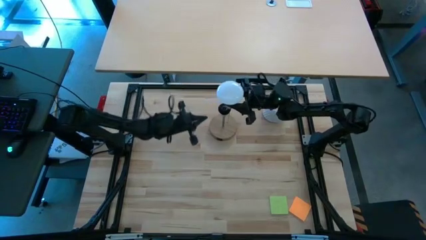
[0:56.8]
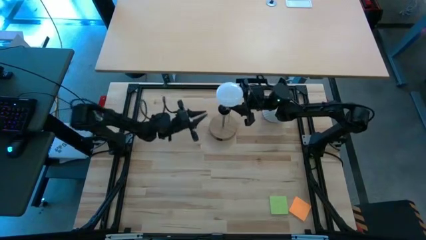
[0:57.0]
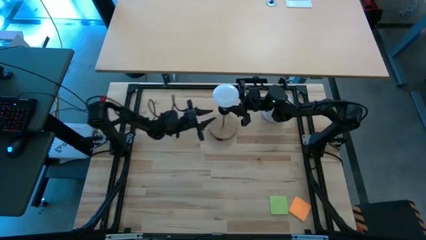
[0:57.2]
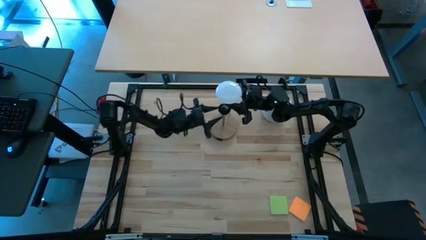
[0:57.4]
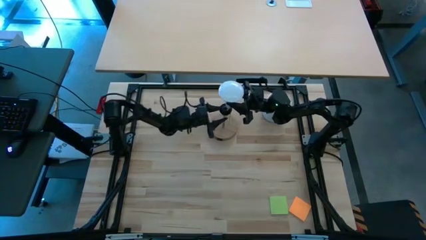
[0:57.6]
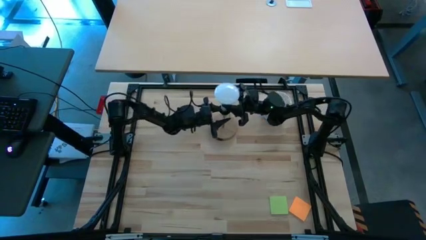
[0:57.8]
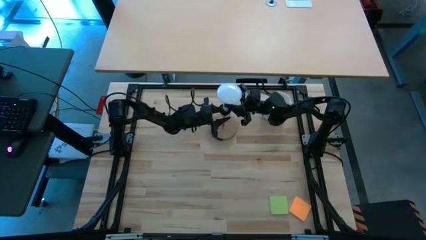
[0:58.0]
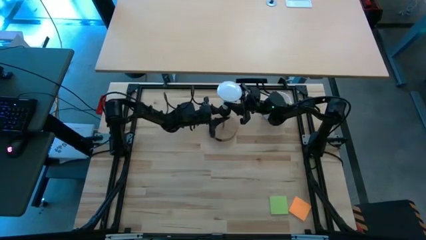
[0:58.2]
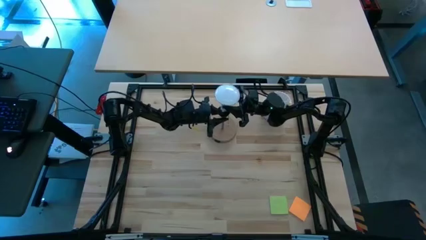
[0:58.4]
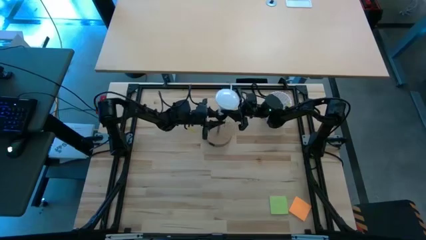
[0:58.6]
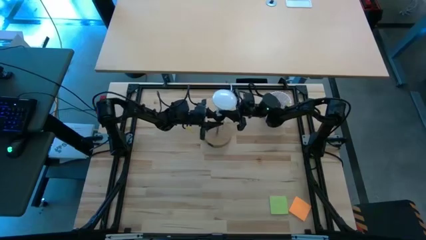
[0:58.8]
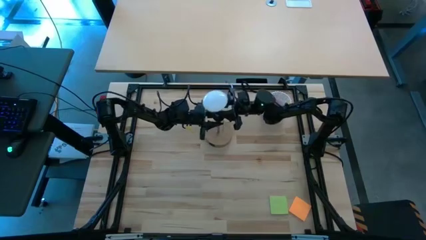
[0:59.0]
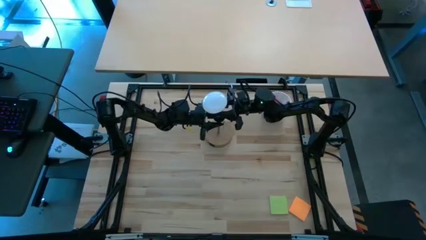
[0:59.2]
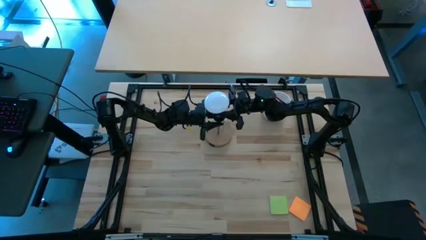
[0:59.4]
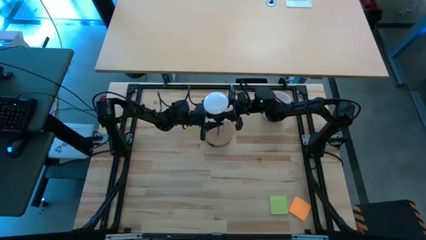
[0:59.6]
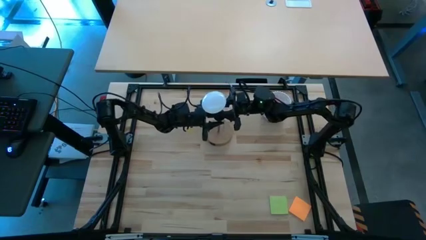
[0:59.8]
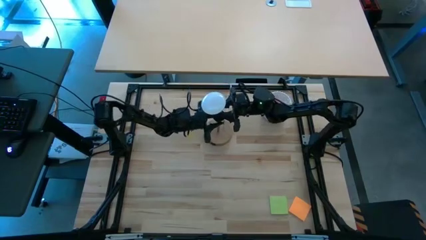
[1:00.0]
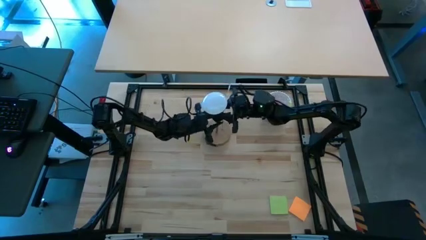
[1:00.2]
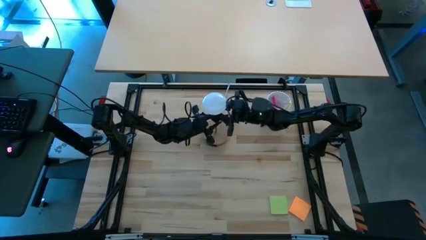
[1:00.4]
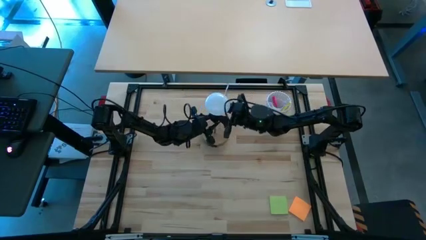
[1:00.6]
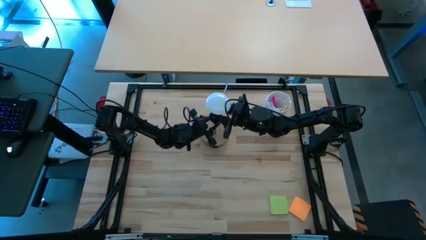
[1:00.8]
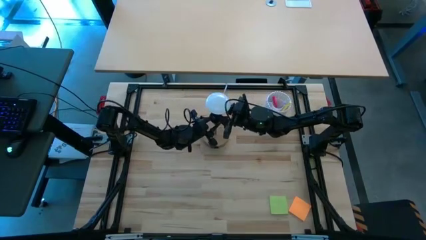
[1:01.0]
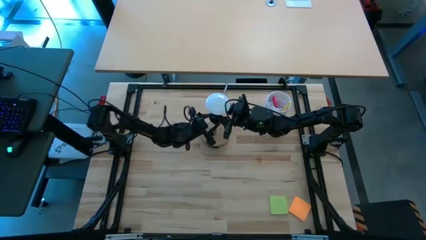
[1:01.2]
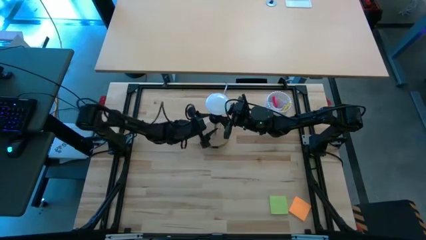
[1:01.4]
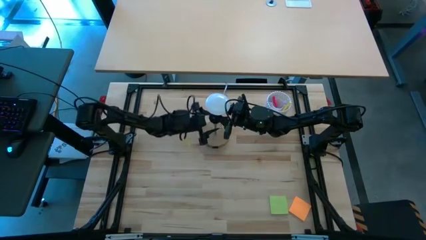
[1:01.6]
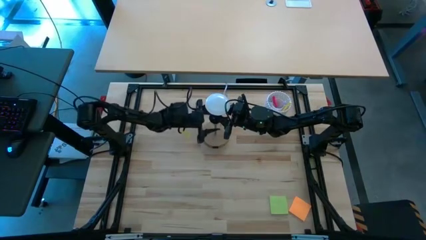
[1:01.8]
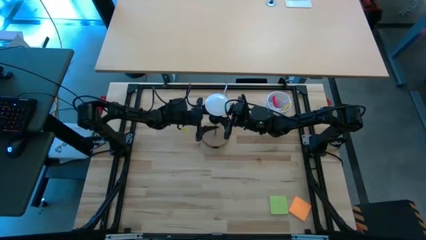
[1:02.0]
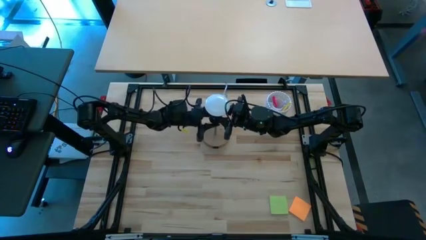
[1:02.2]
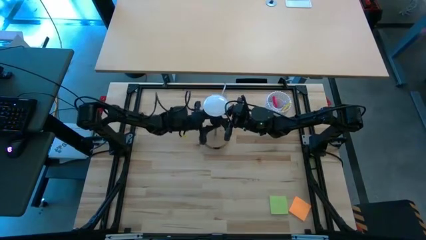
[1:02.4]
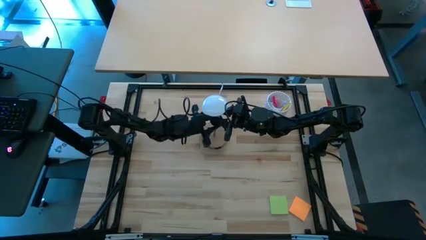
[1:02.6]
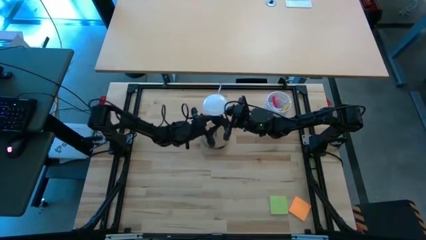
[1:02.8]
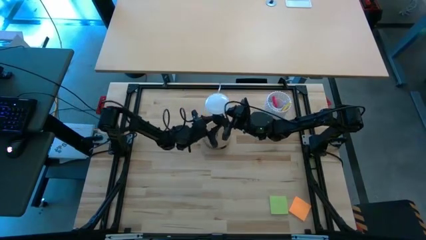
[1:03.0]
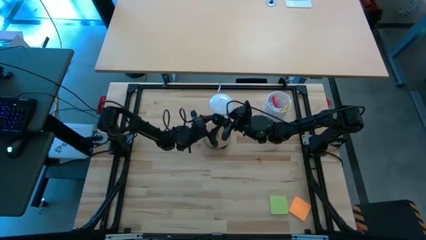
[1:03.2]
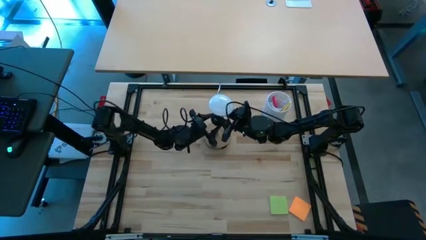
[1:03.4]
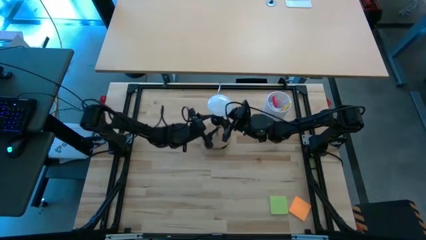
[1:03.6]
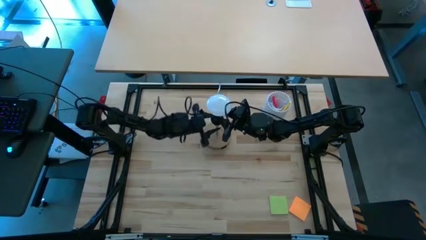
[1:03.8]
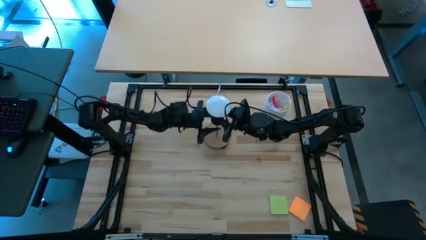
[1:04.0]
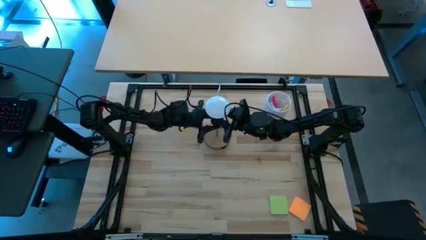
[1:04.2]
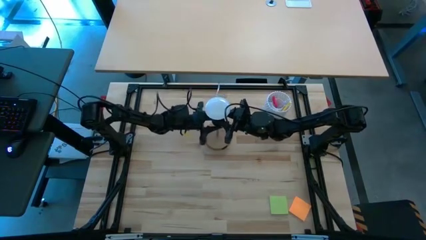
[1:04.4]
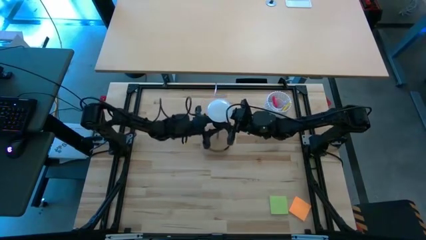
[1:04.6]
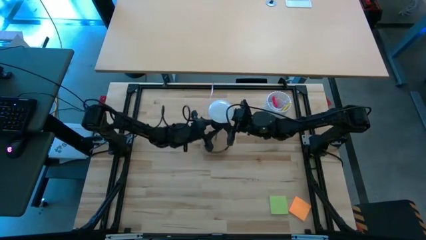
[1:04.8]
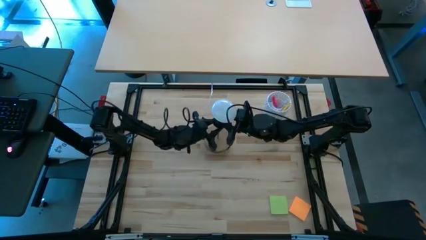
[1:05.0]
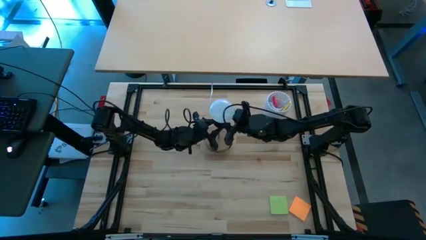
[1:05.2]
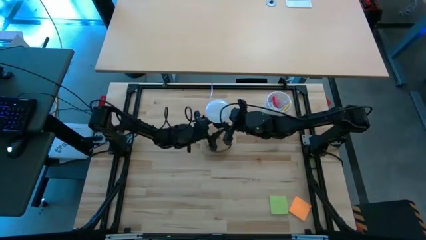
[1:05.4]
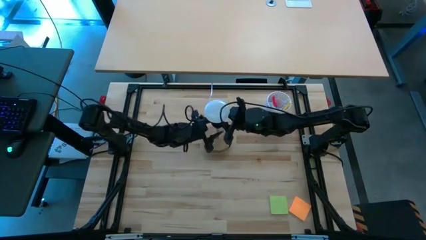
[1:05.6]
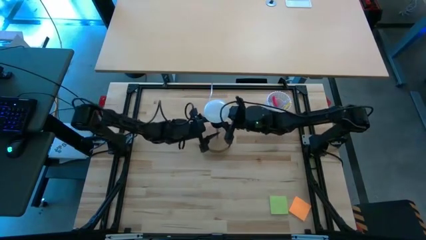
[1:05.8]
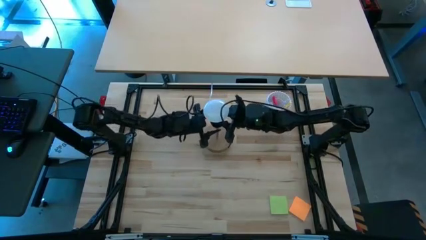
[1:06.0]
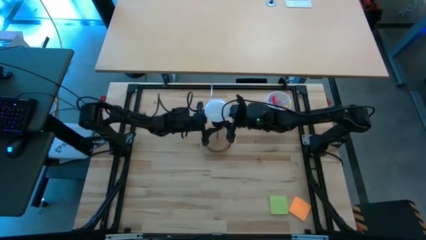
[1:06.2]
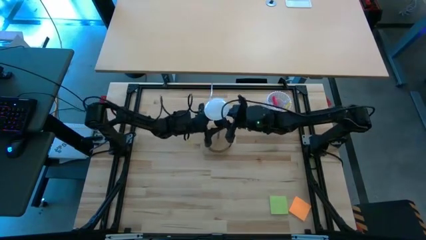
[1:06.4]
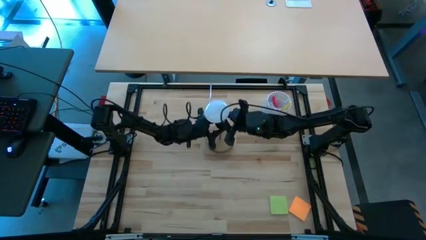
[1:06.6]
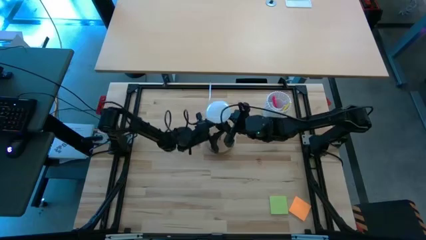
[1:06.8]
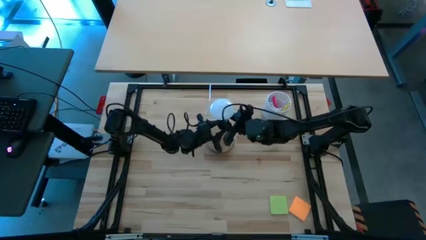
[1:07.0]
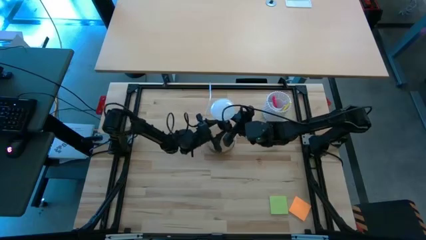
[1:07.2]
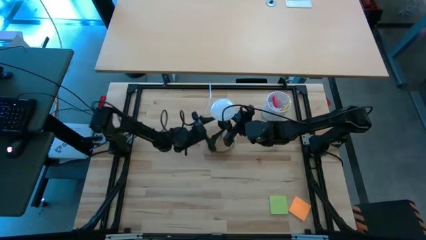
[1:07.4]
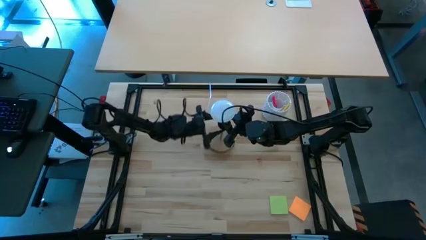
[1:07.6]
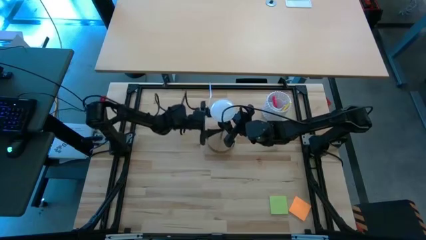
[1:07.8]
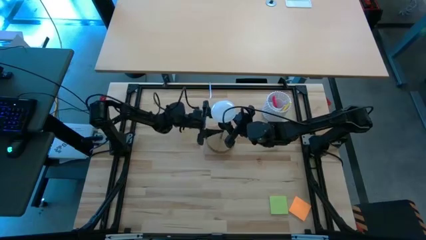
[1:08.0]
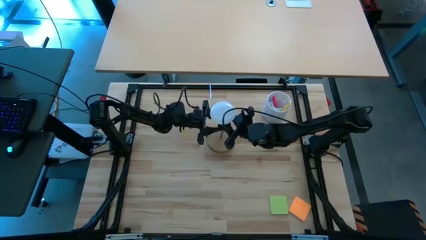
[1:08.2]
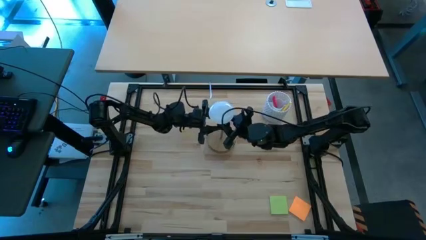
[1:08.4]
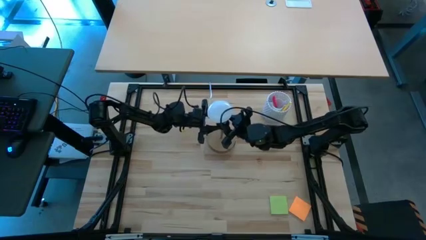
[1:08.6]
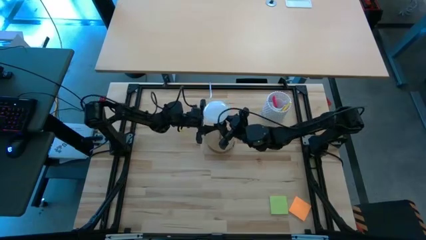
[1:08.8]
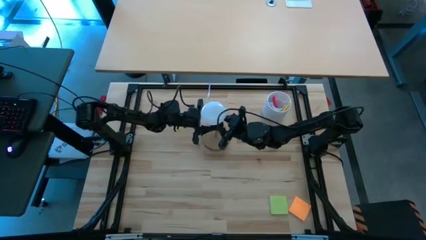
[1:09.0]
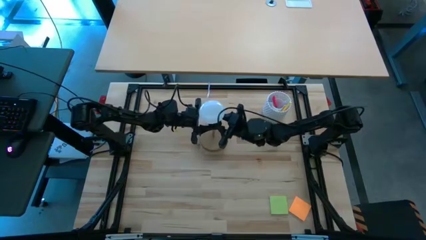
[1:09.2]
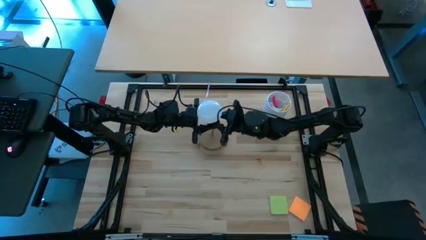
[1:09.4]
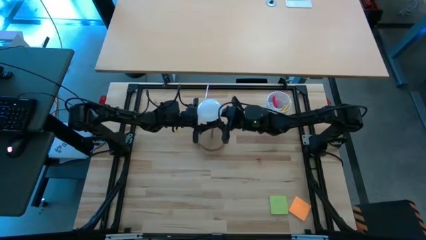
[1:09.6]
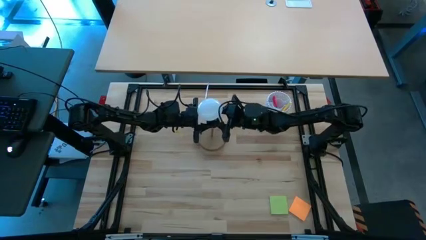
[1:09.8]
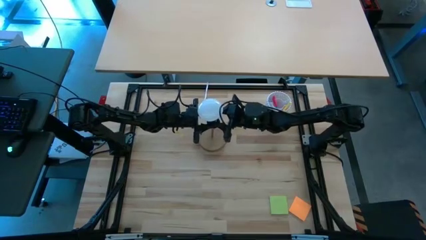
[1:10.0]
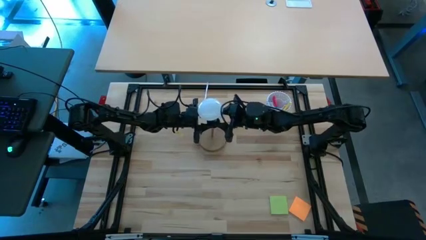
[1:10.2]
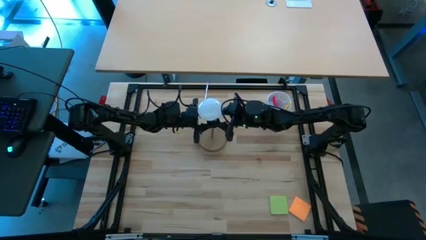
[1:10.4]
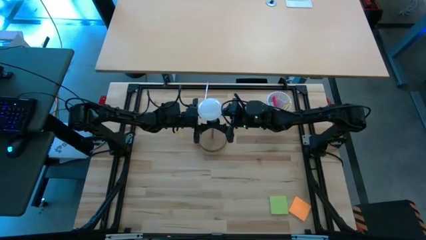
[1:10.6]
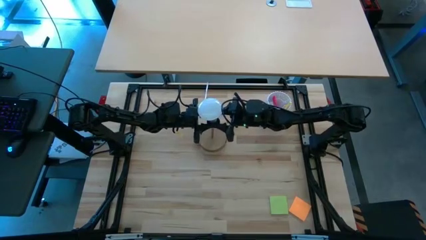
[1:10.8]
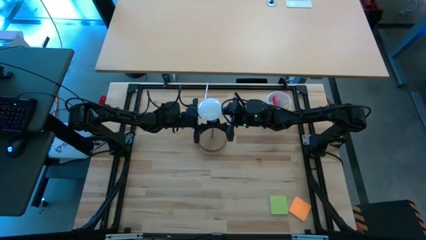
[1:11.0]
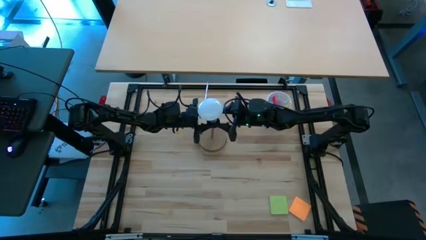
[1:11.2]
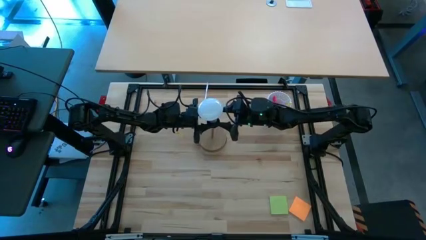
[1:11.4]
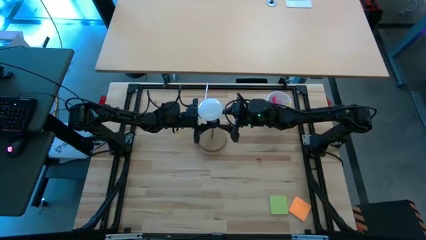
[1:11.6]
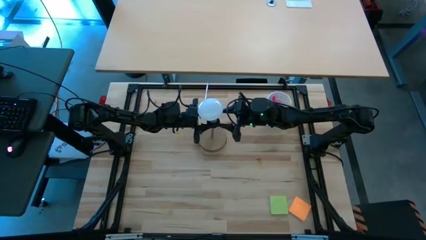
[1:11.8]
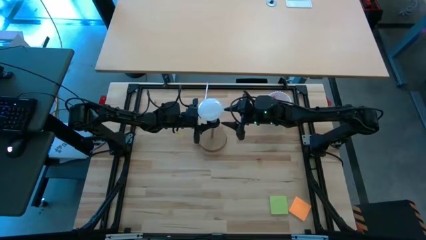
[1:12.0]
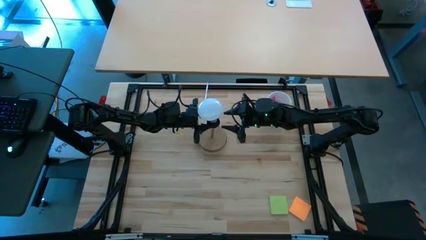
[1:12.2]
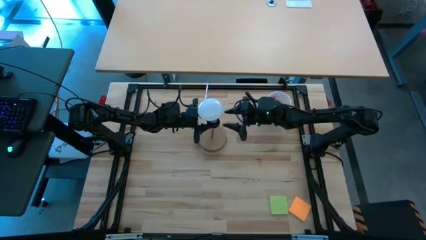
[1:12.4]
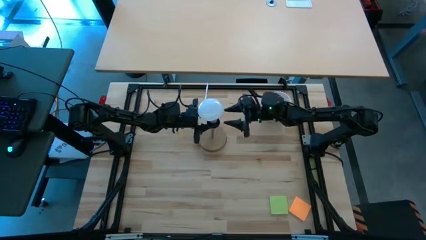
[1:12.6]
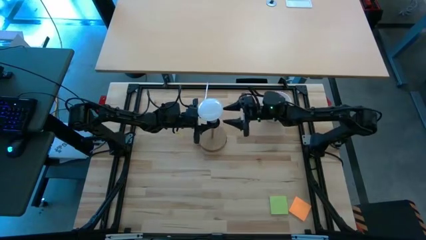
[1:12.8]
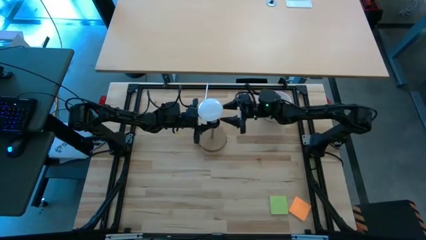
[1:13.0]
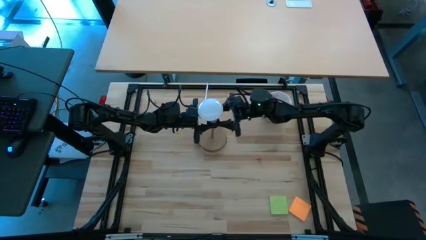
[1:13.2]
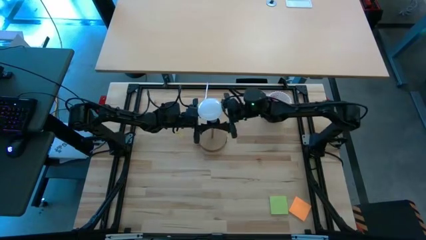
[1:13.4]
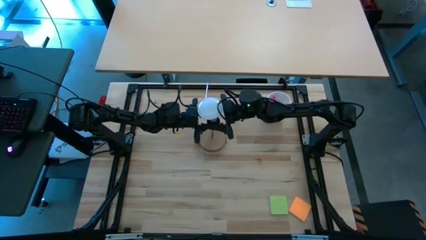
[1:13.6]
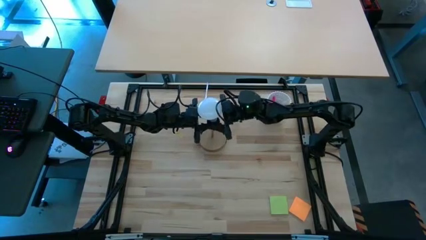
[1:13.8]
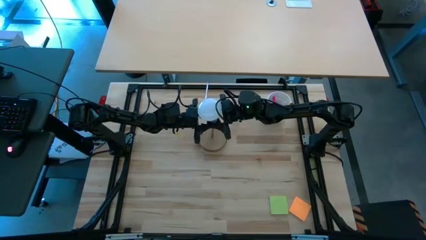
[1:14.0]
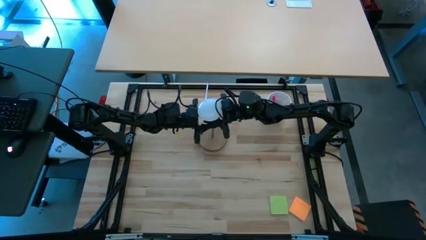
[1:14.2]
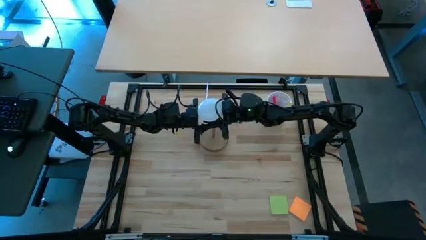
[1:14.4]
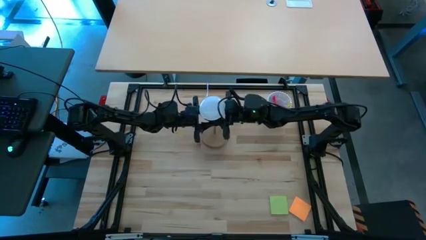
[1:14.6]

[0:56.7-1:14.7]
Task: Screw lightbulb
Insert the white lightbulb into the desk lamp
